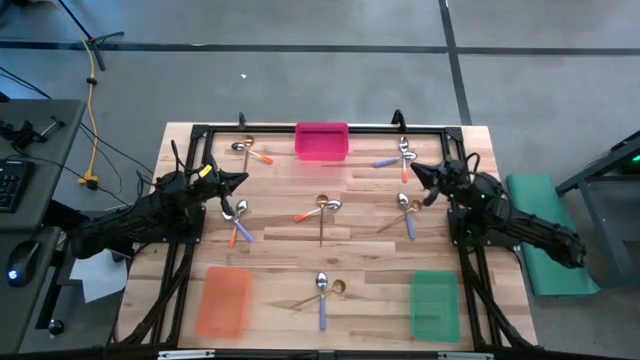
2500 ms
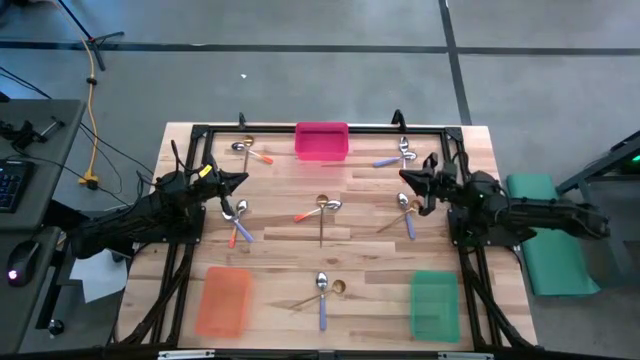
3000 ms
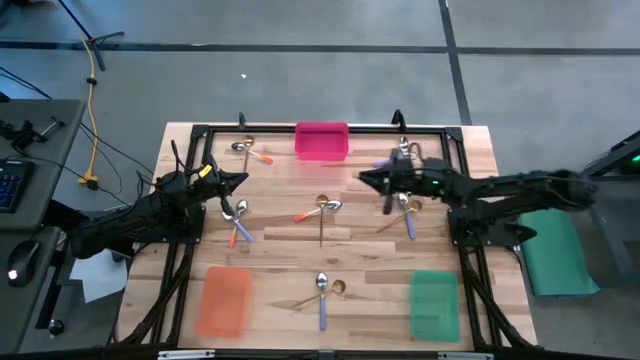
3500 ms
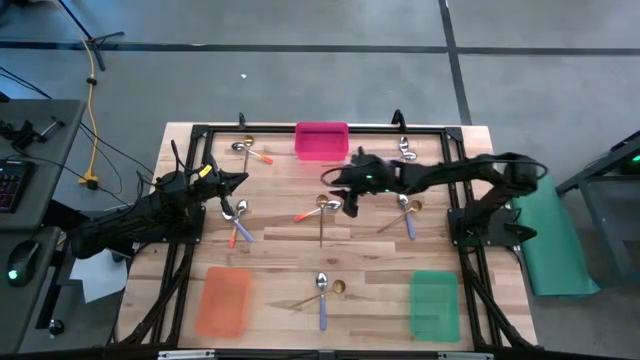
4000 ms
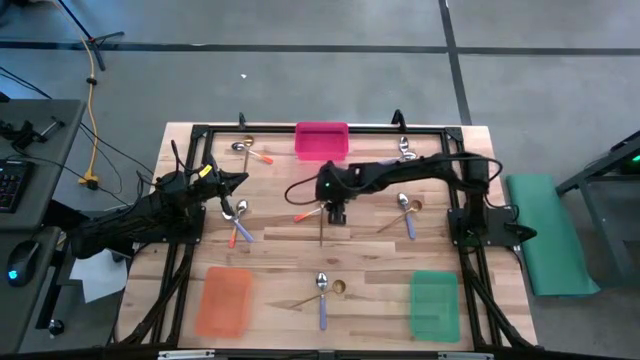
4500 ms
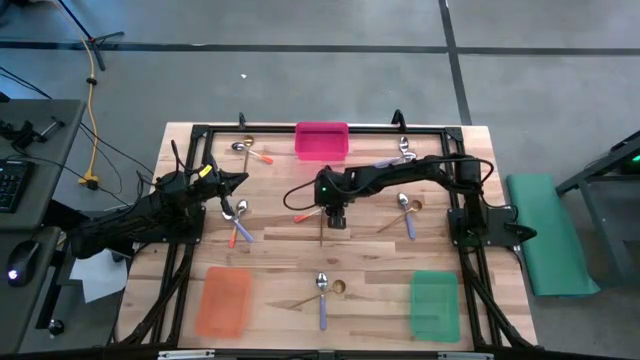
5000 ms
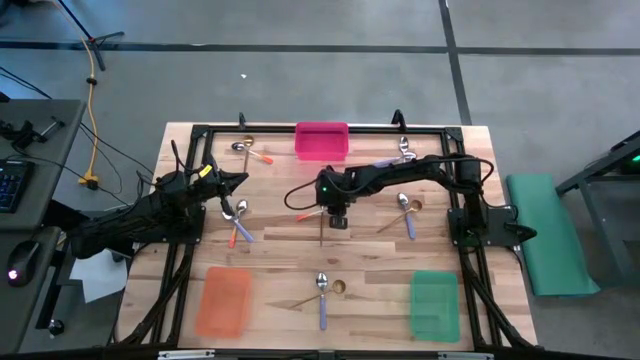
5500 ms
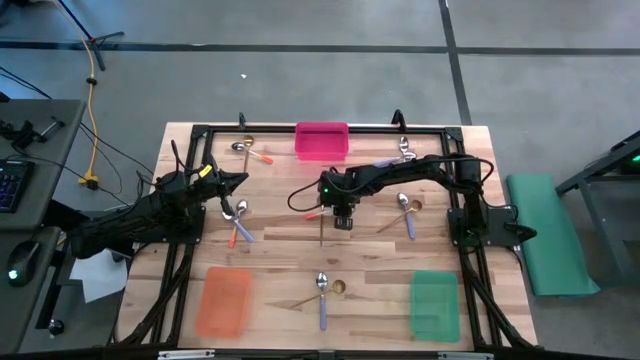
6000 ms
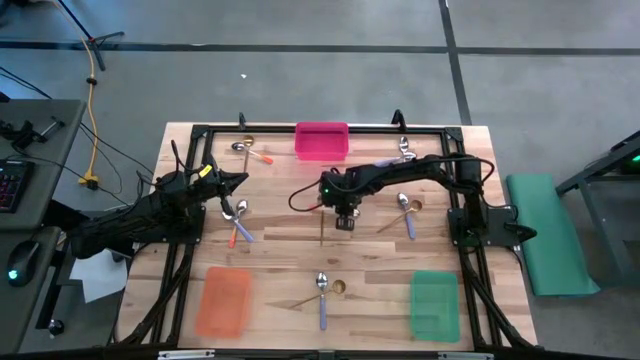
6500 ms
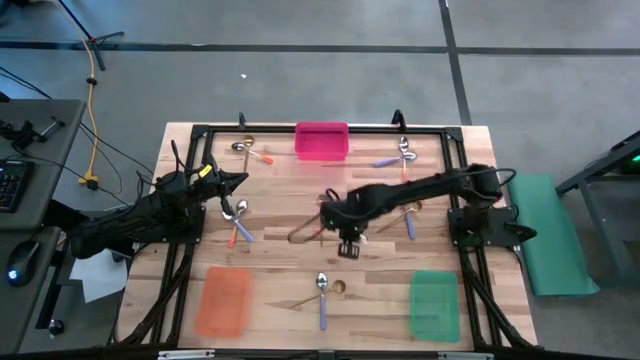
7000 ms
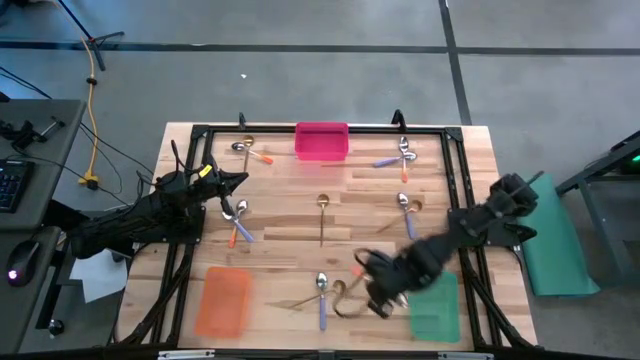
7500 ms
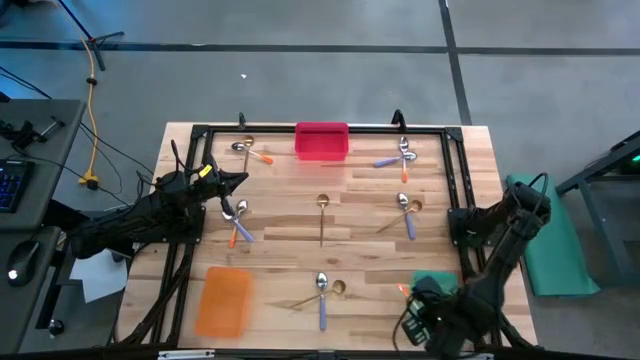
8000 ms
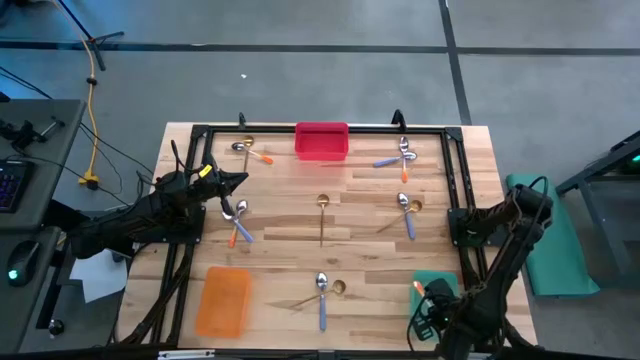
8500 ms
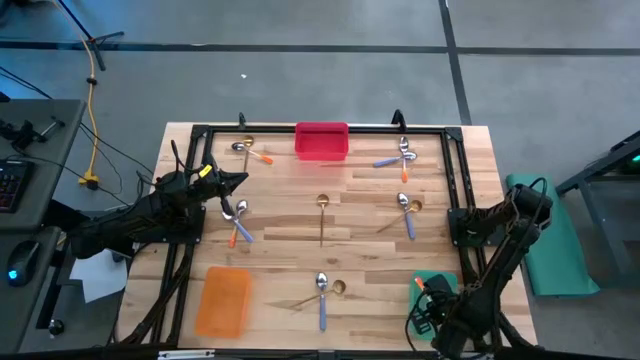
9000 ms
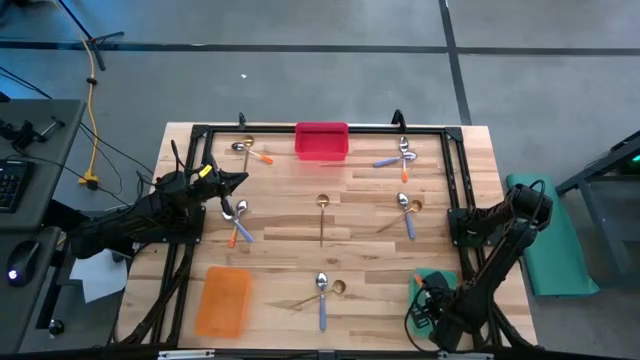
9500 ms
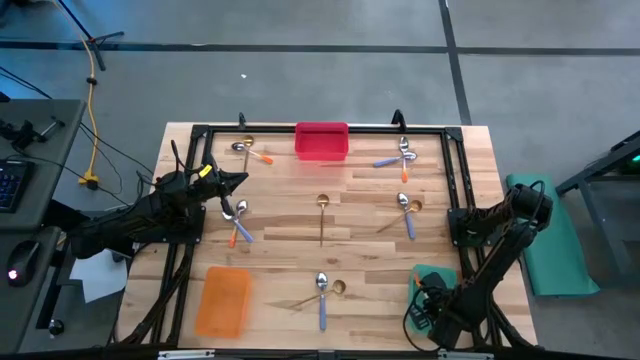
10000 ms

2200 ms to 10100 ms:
Task: Sort silverware by color (type)
Put the orange spoon into the green bin

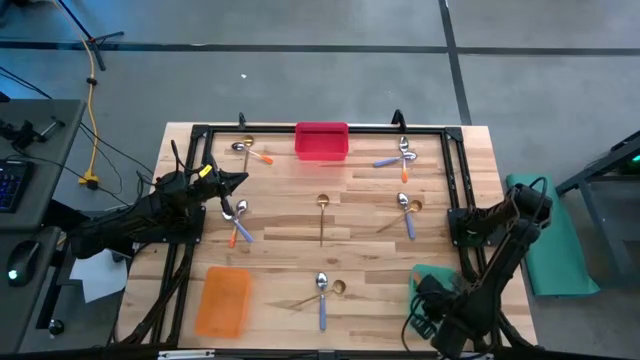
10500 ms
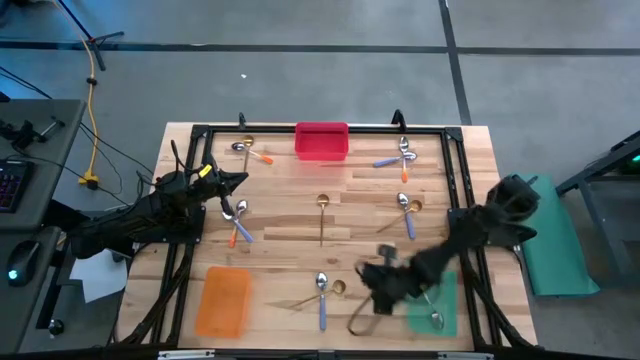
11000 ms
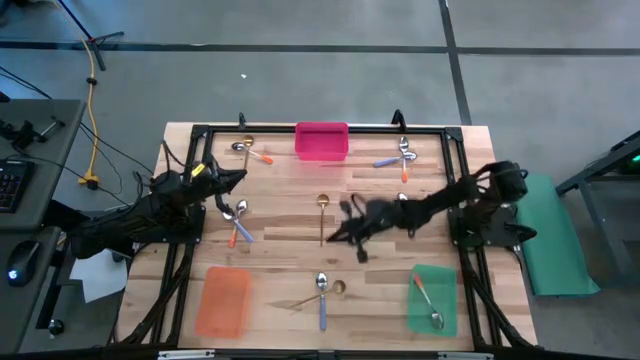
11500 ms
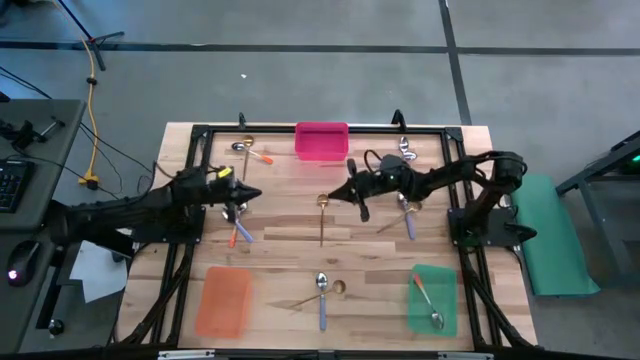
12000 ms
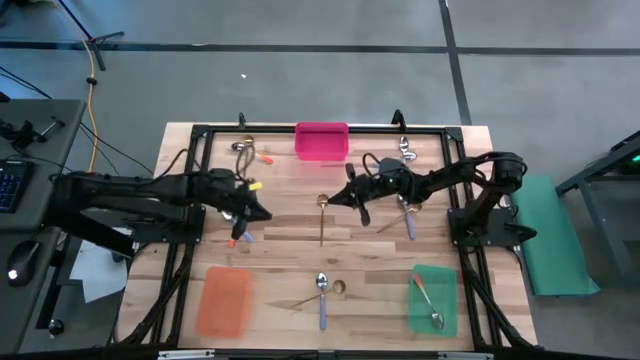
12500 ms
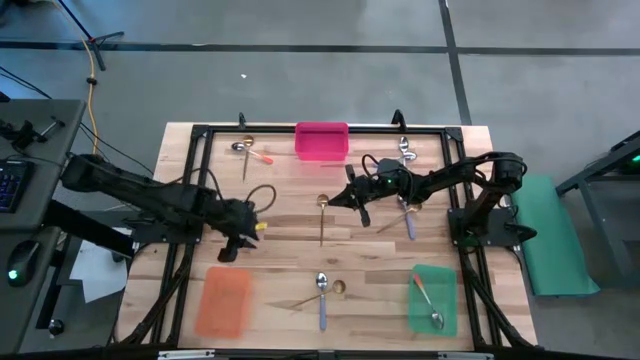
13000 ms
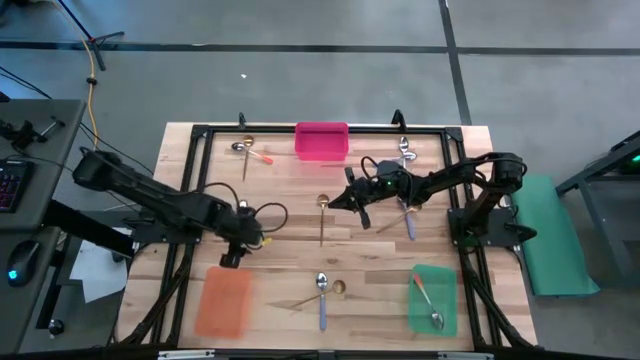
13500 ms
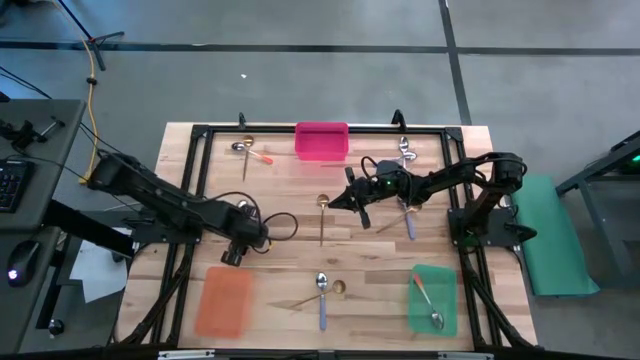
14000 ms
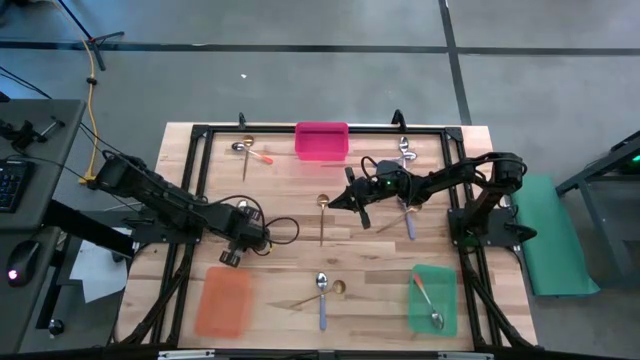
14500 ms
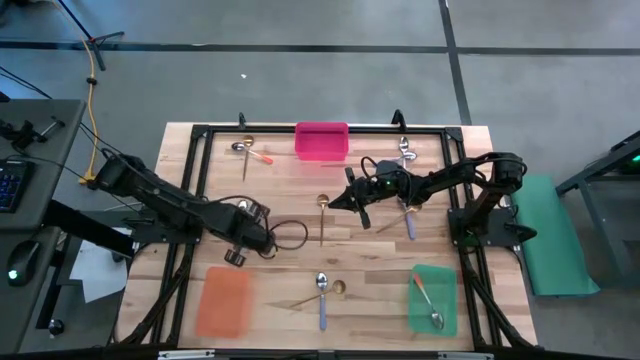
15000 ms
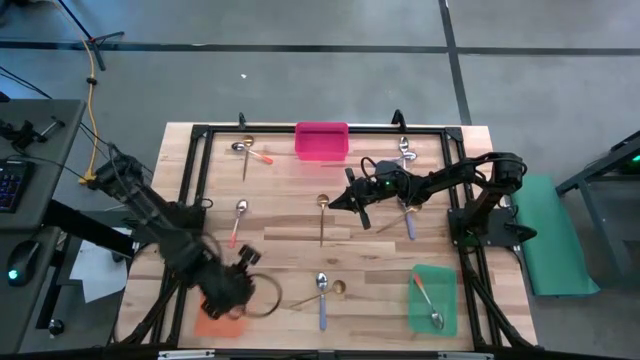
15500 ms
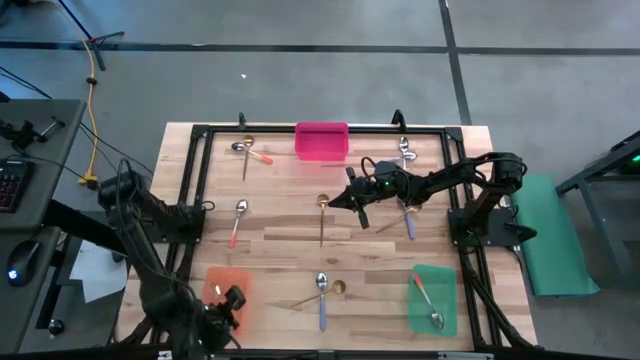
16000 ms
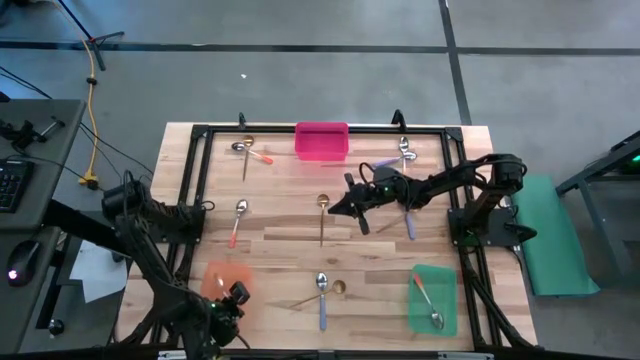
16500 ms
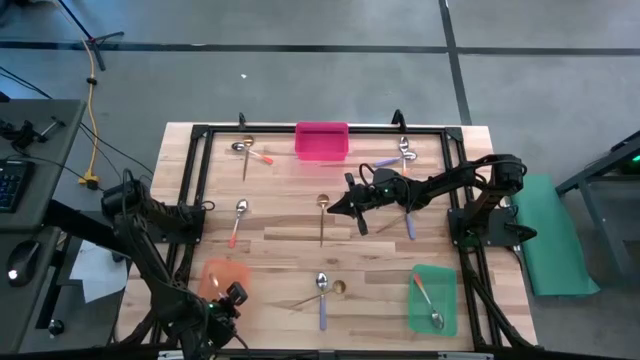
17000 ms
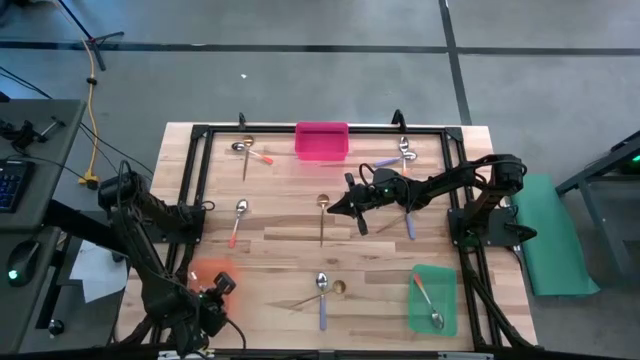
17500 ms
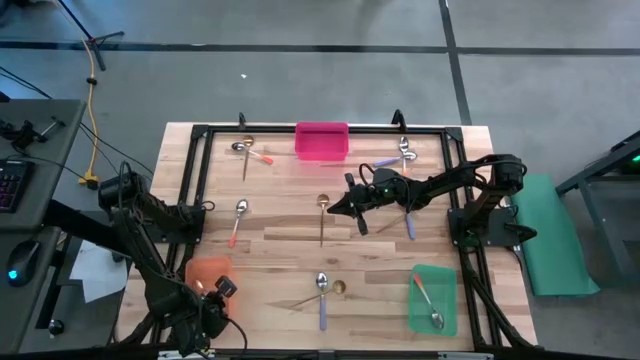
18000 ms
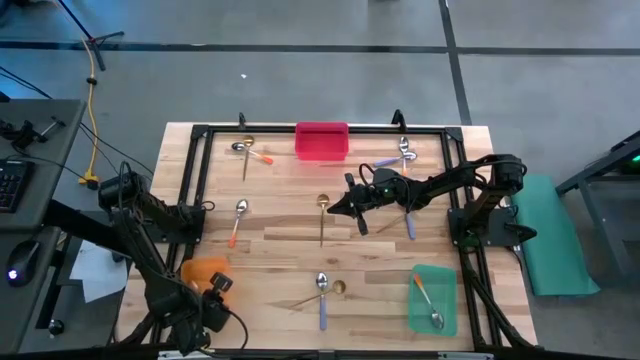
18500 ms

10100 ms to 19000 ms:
Put the purple spoon into the orange bin

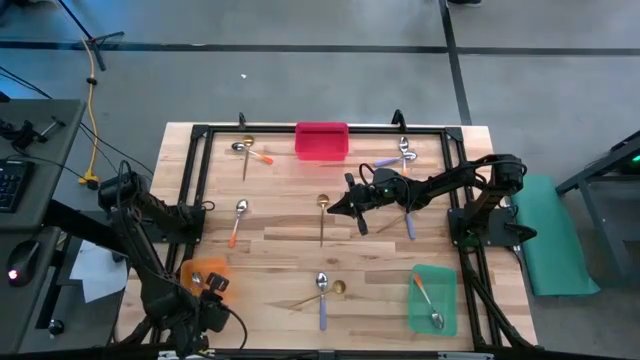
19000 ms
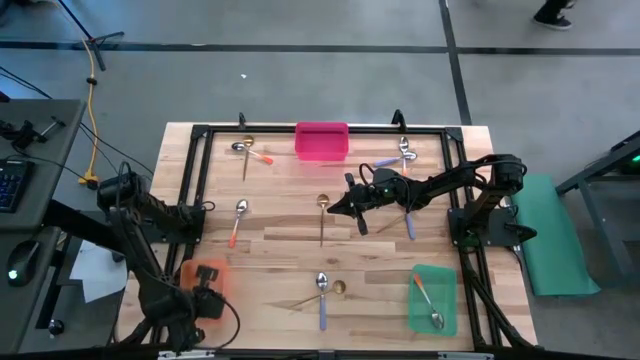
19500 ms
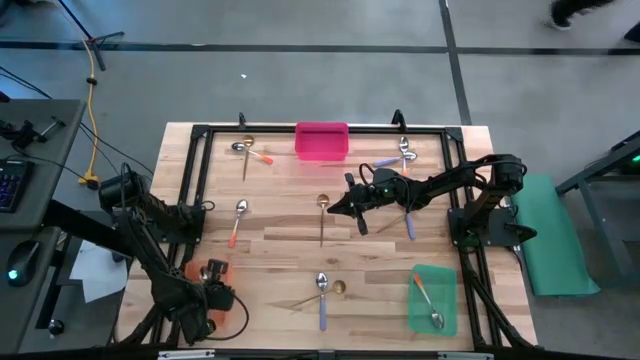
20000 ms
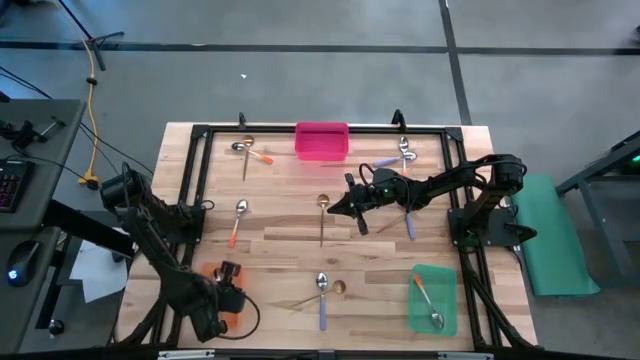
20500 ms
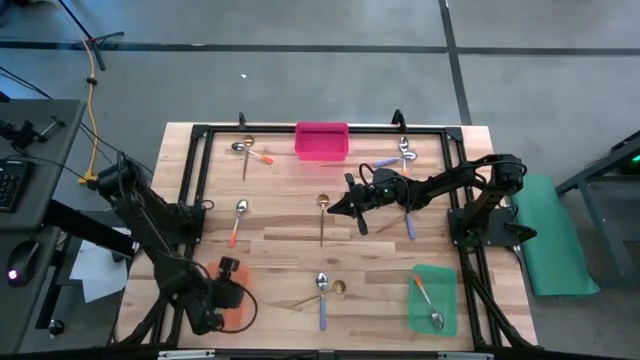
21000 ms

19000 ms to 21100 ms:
Adjust the orange bin

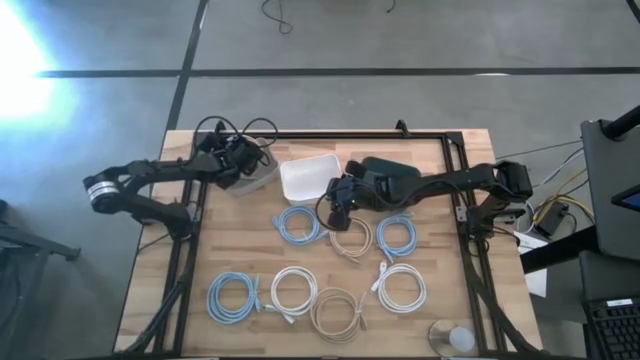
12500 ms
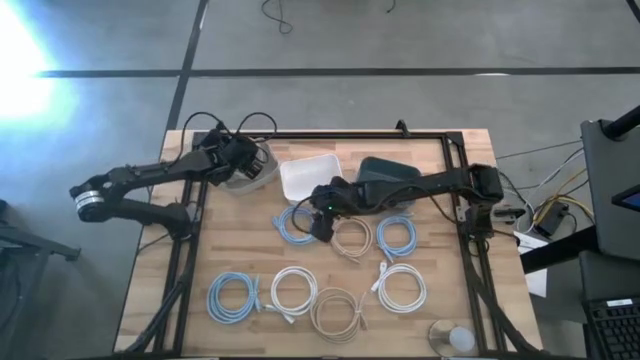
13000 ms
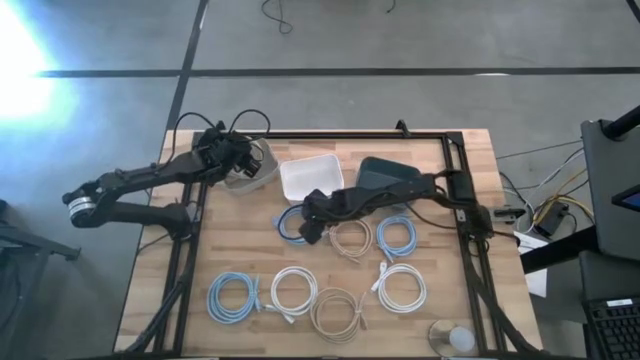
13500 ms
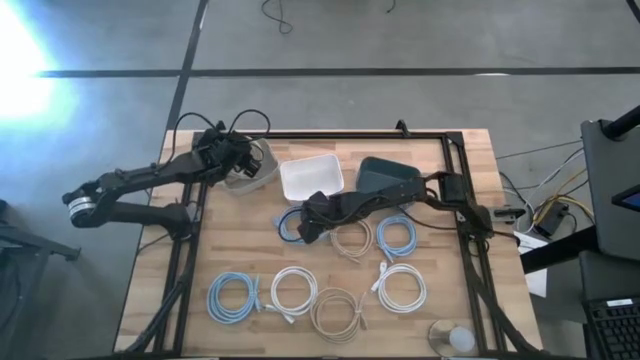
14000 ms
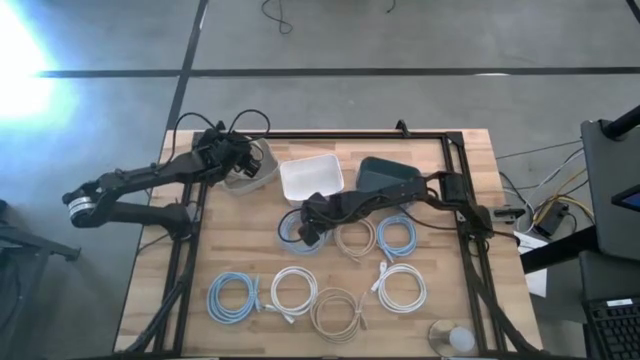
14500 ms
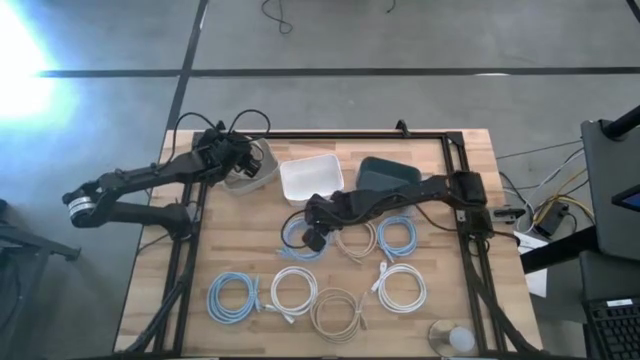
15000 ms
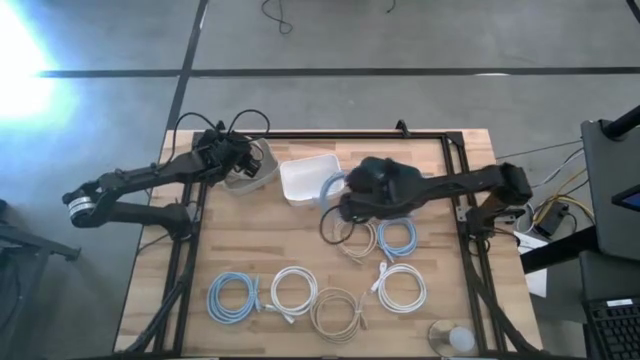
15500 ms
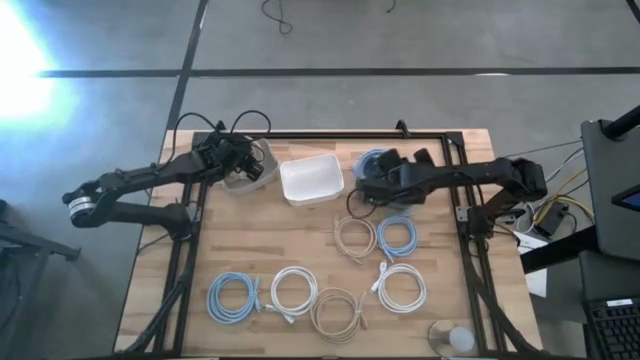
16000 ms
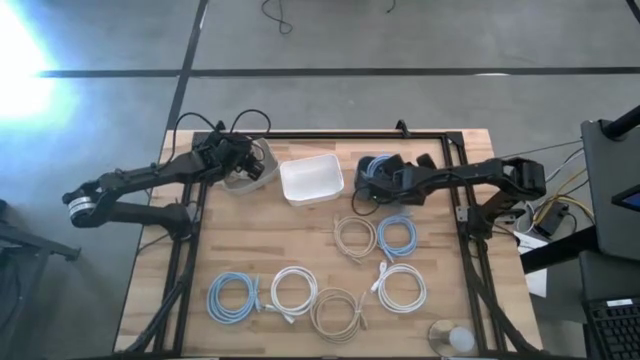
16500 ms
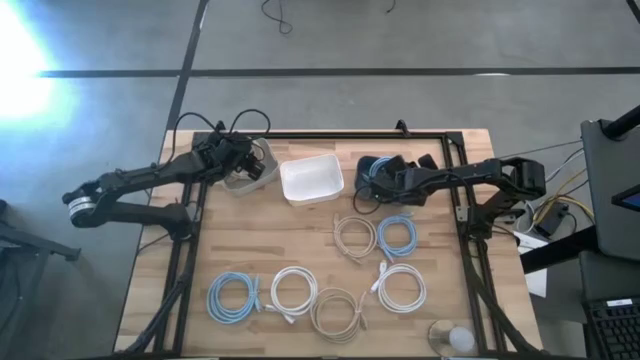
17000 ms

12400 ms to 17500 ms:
Task: Sort HDMI cables
Put the top left light blue HDMI cable into the blue bin
